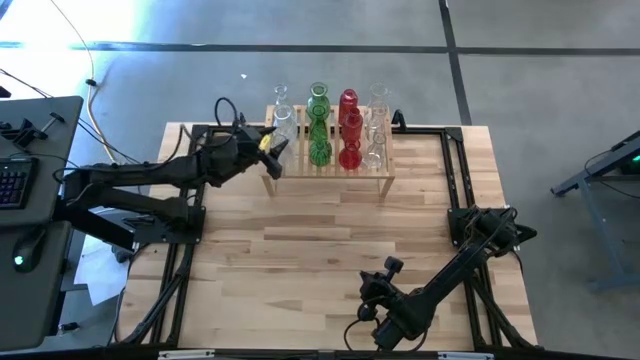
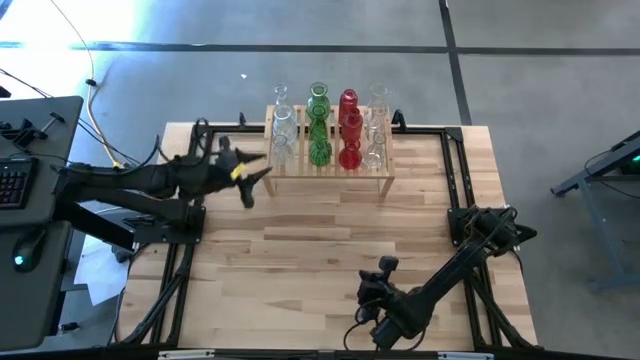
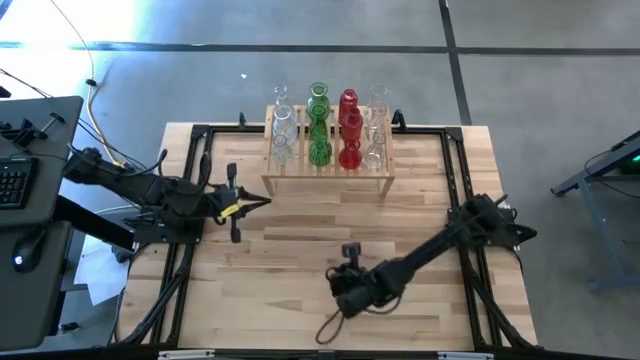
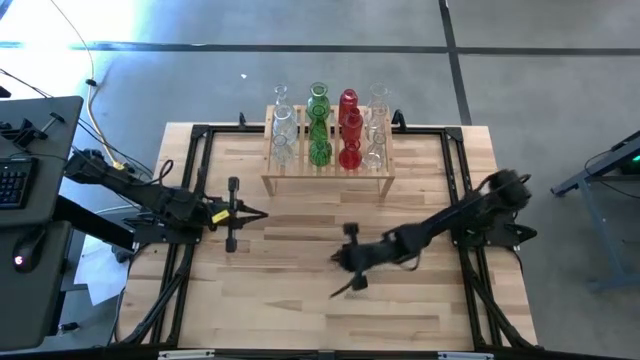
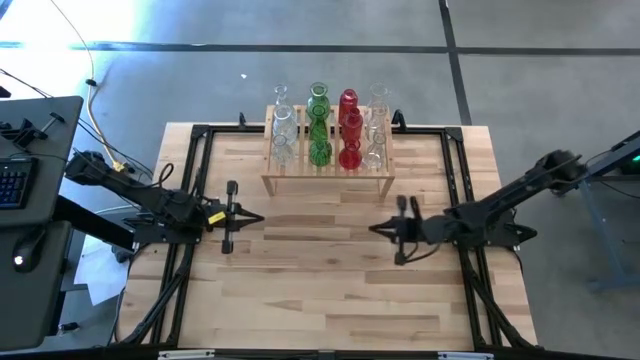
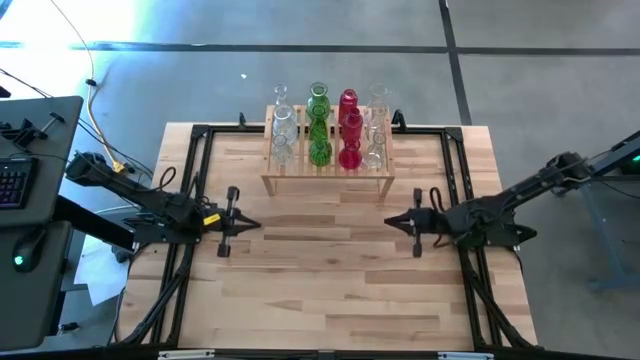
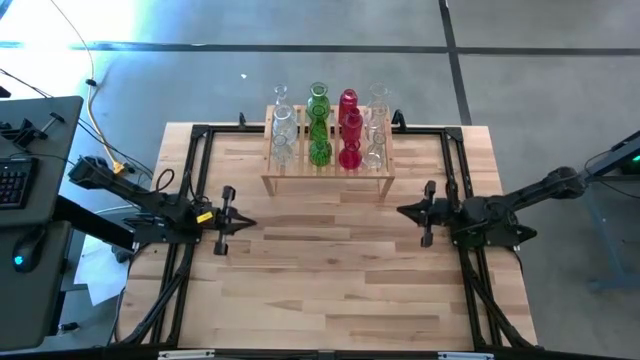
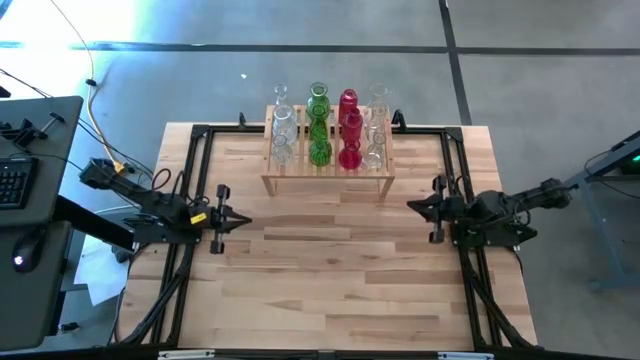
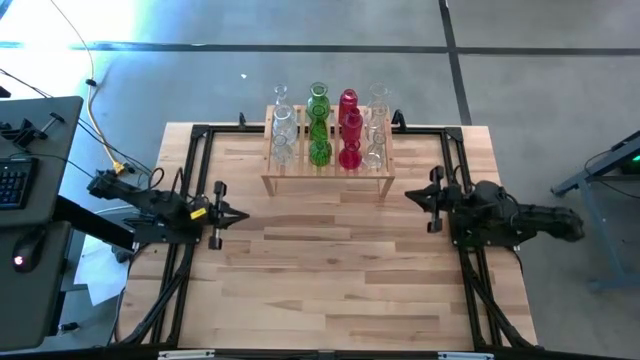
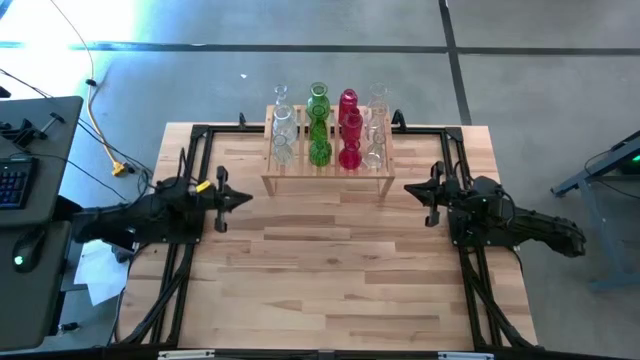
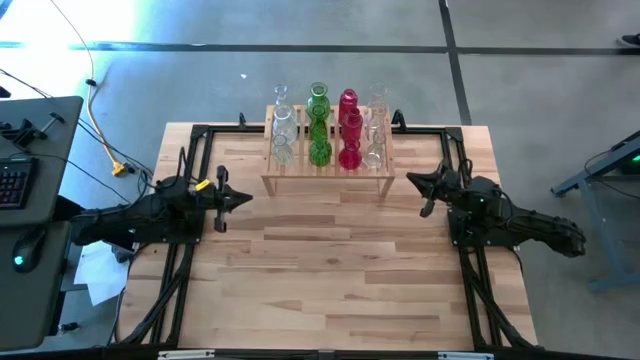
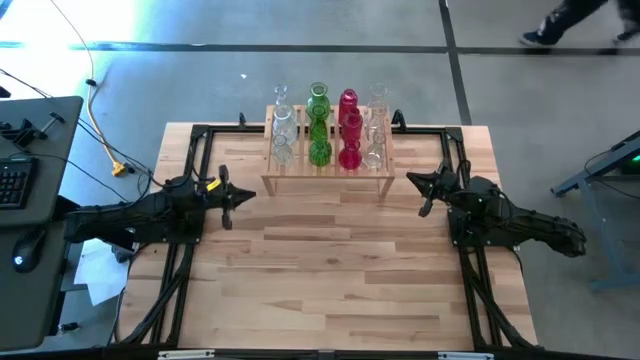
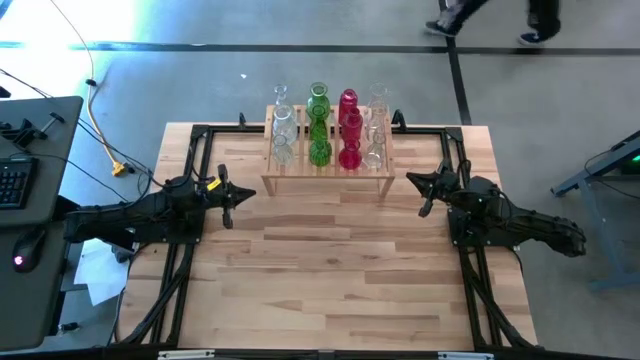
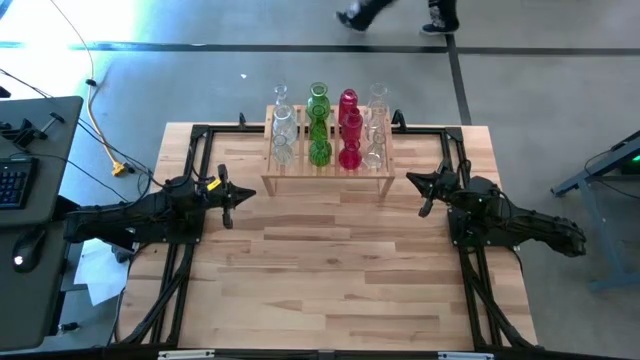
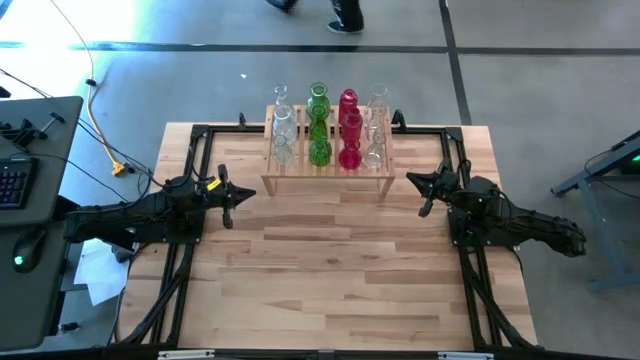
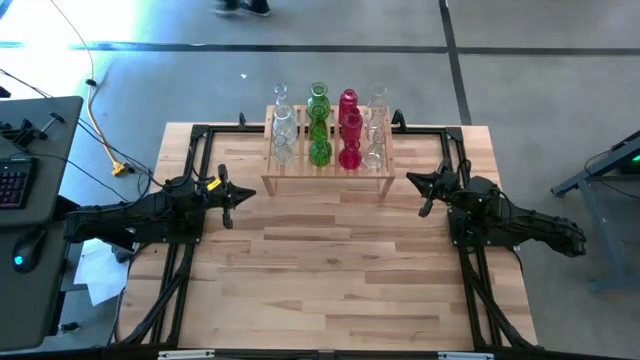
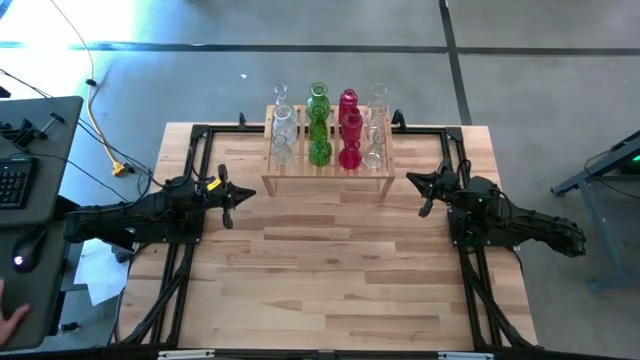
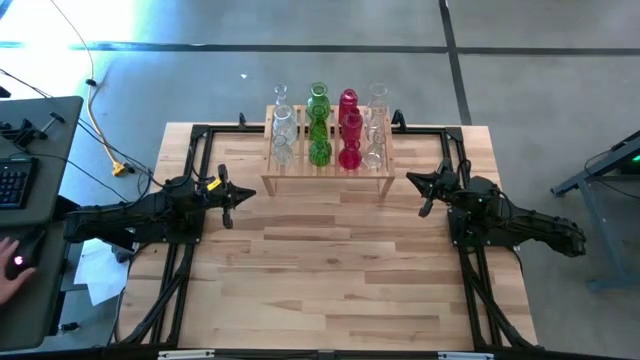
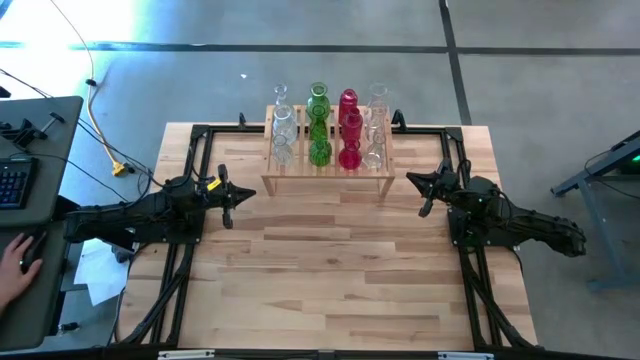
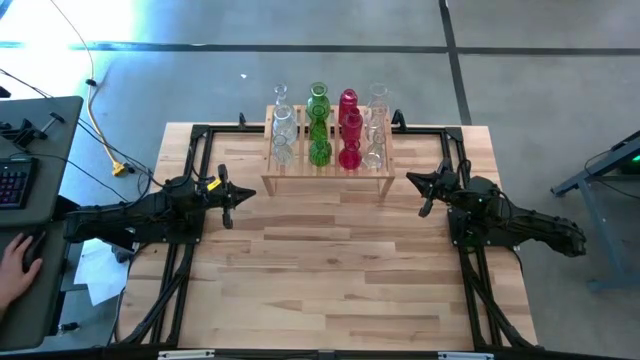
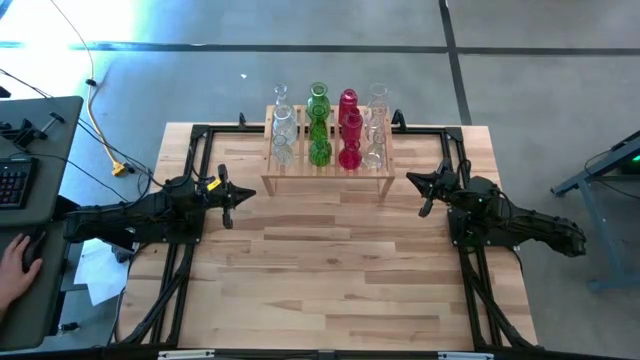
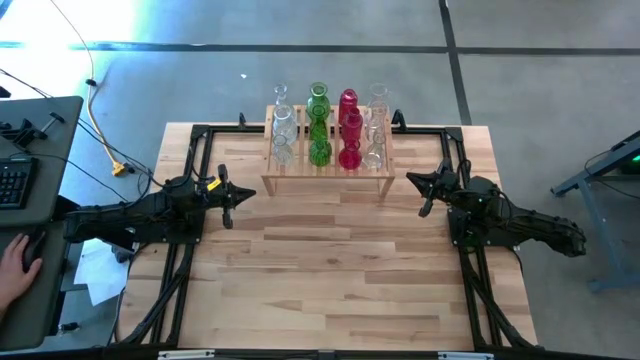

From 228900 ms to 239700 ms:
Task: sort vases onto shelf
Return to Home Position

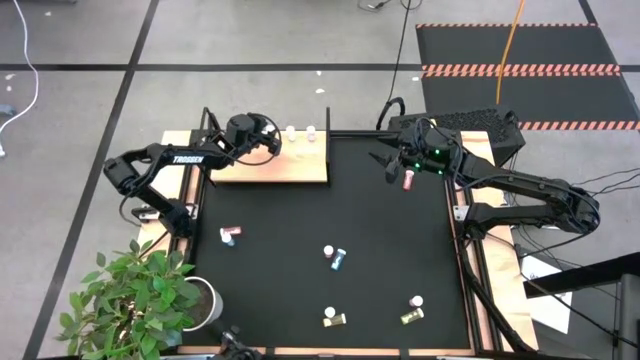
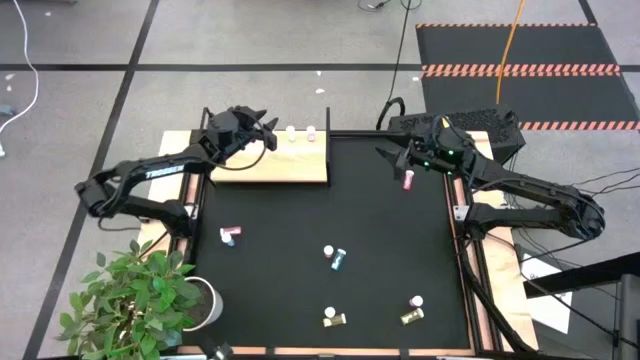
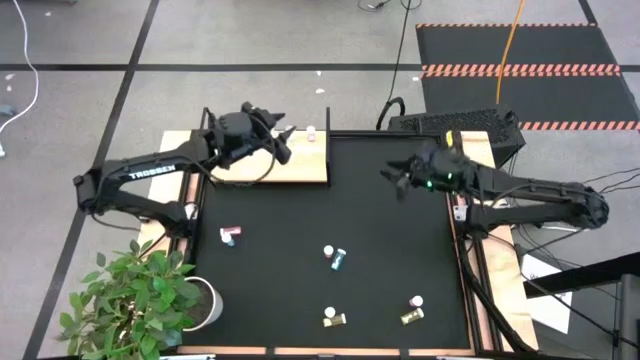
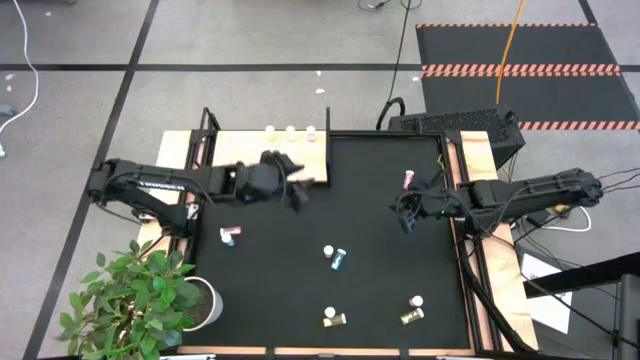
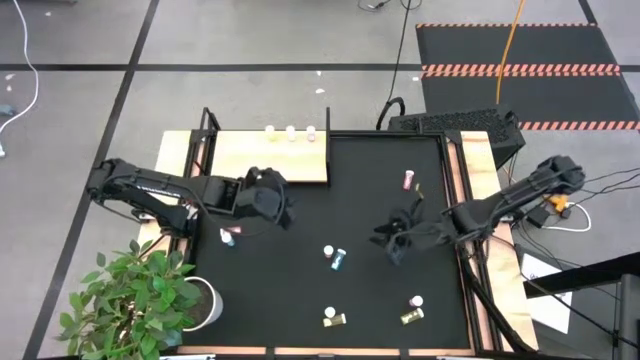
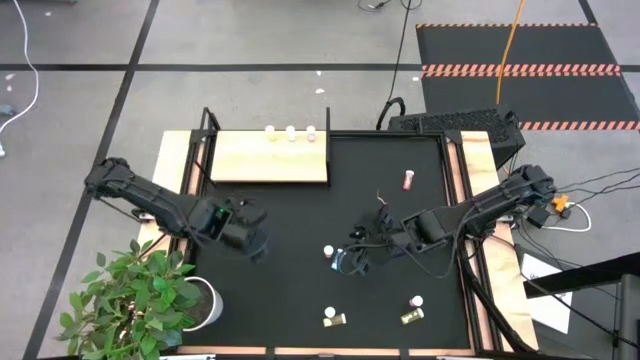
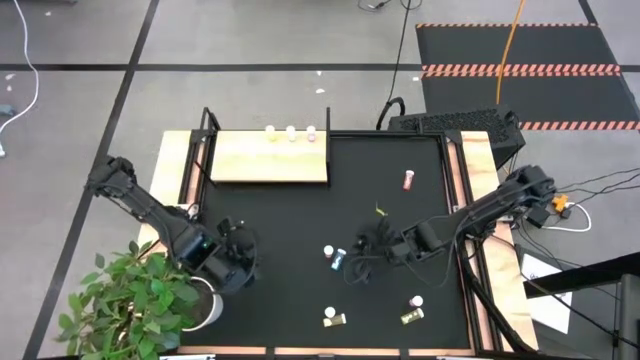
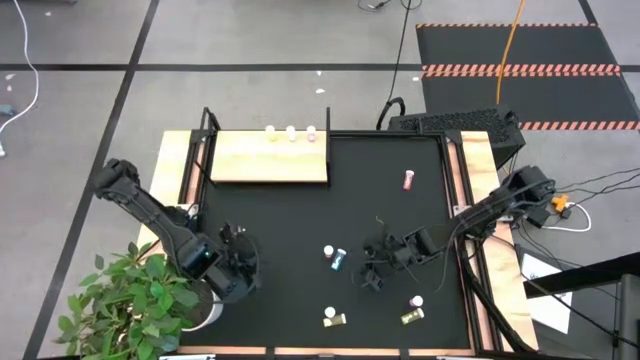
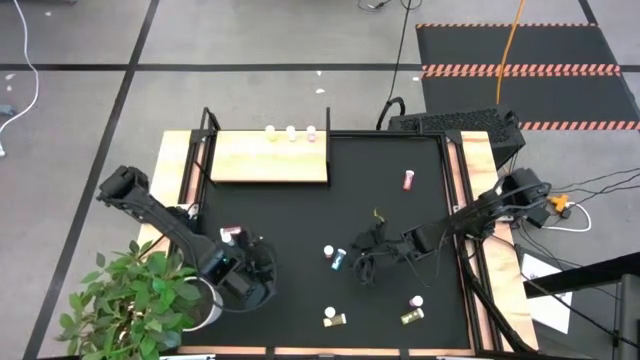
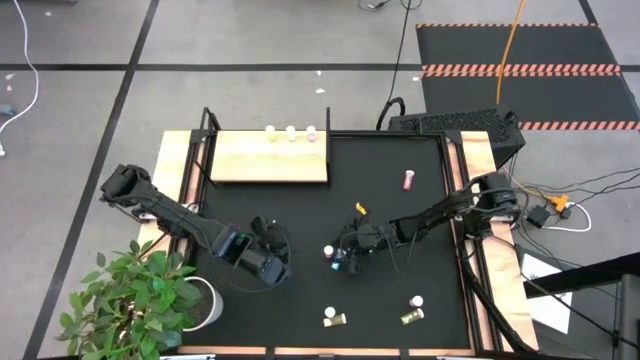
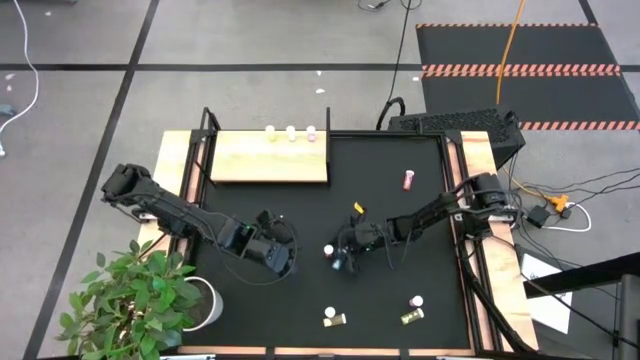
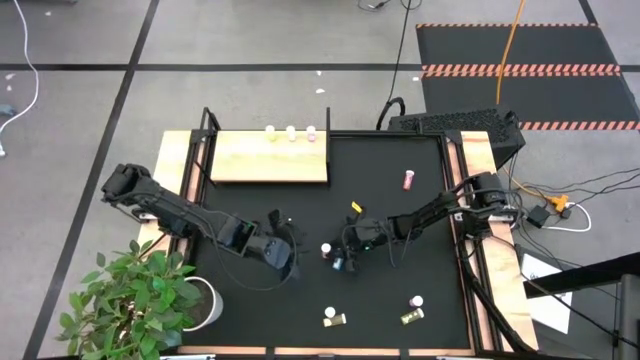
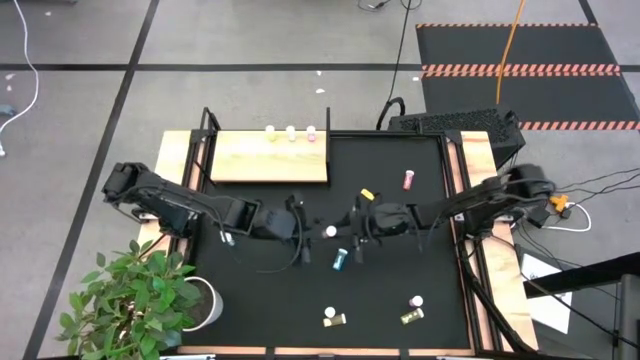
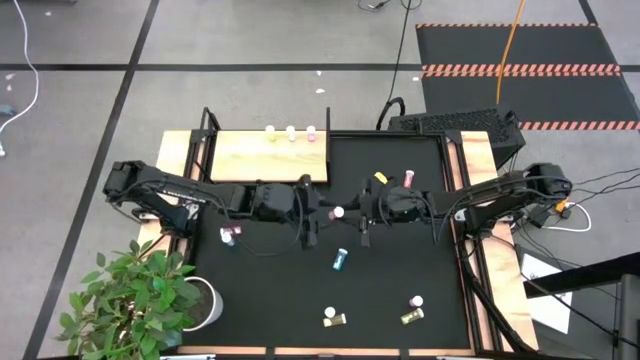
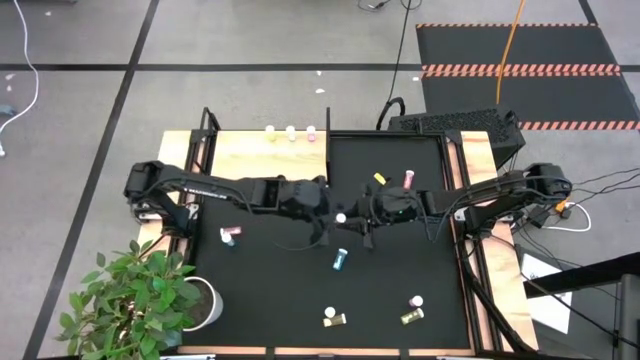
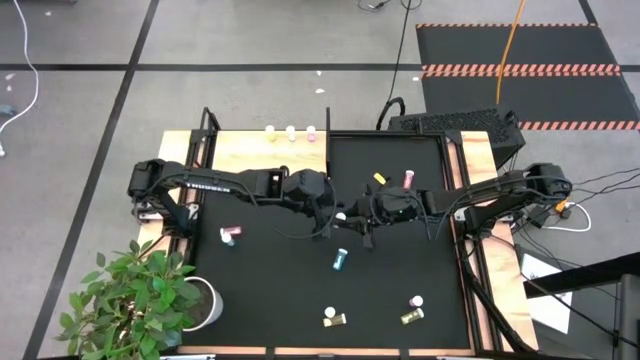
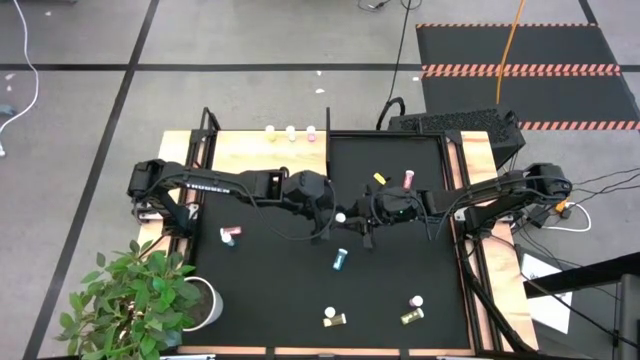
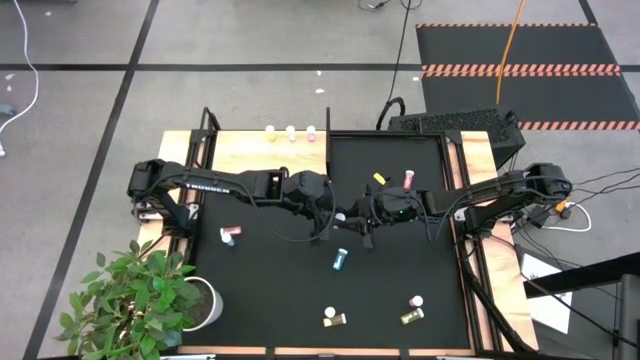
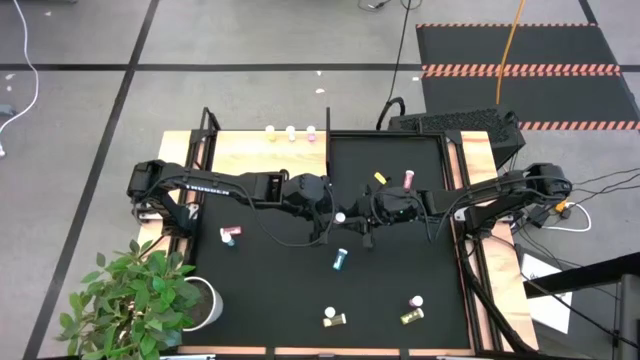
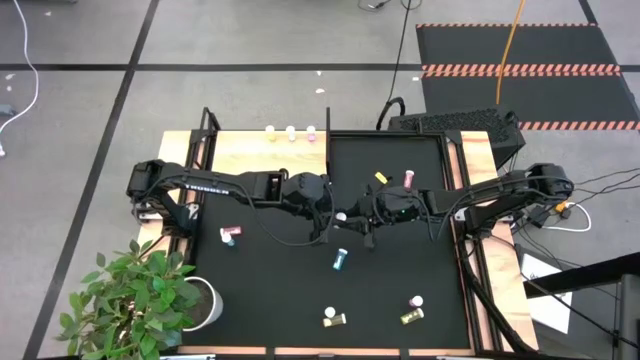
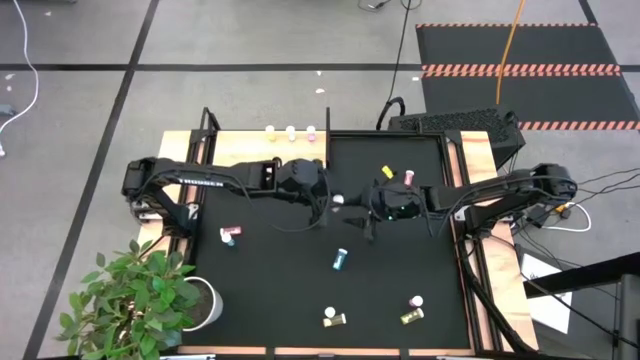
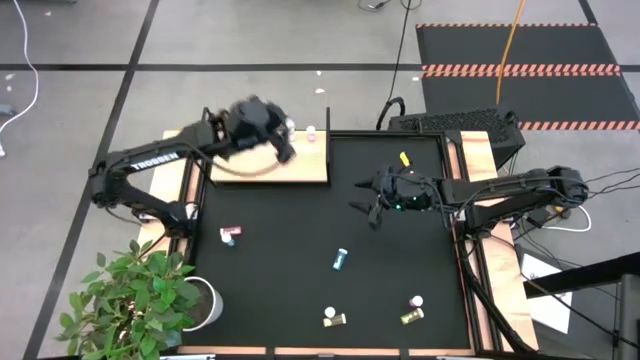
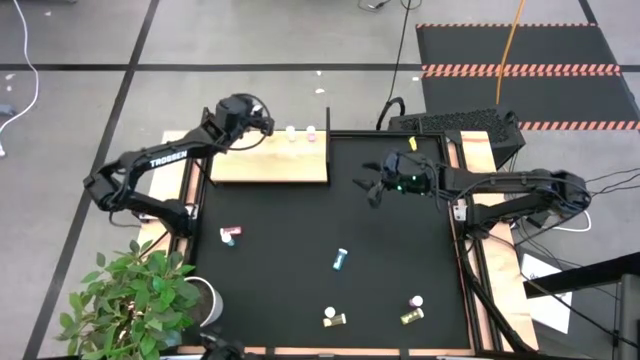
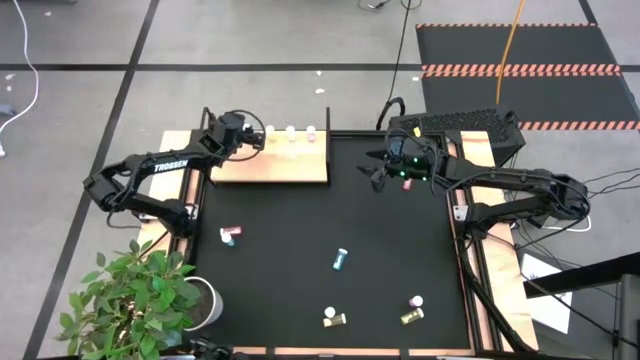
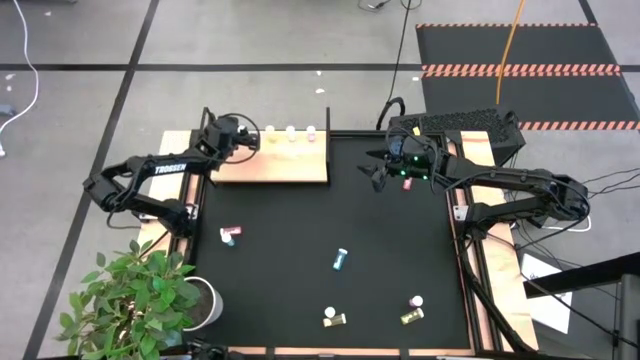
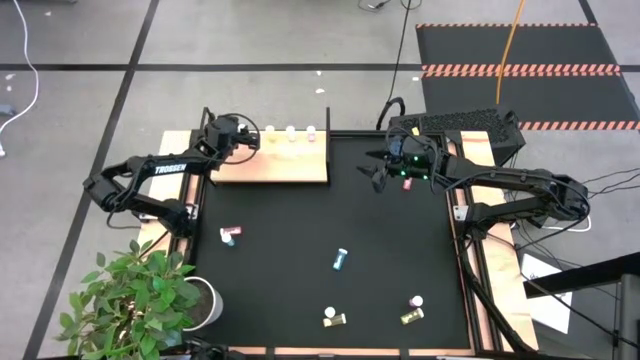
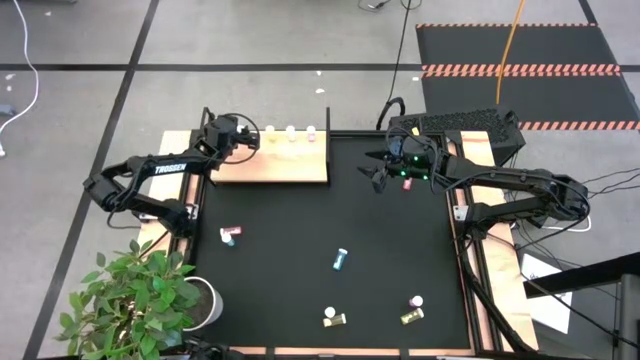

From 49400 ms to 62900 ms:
Task: Pick and place medicine bottles onto shelf by color
Put the bottom right pink pill bottle on the shelf
